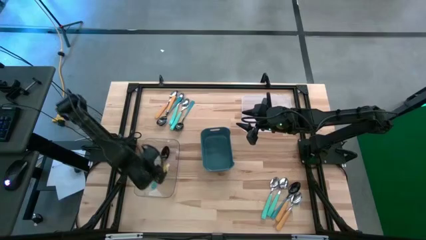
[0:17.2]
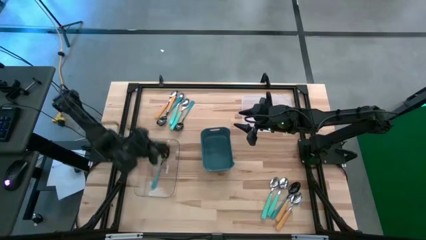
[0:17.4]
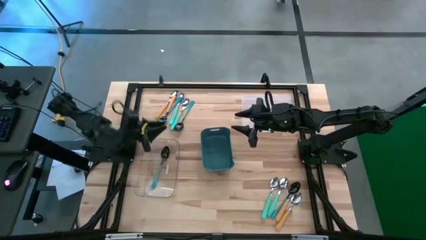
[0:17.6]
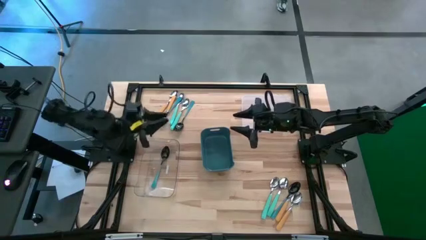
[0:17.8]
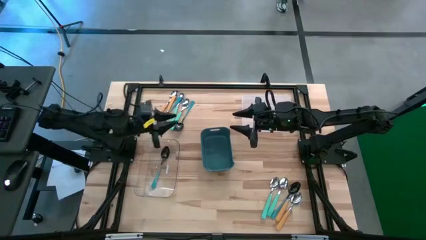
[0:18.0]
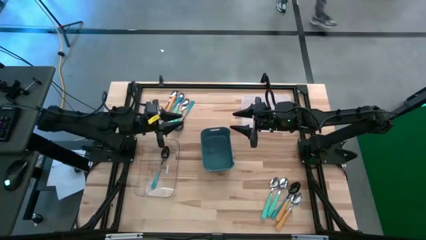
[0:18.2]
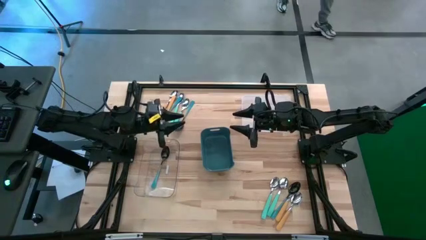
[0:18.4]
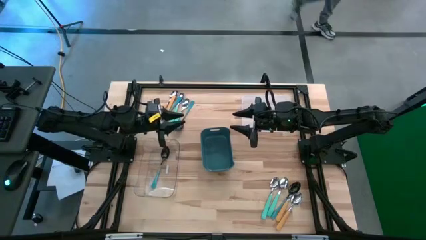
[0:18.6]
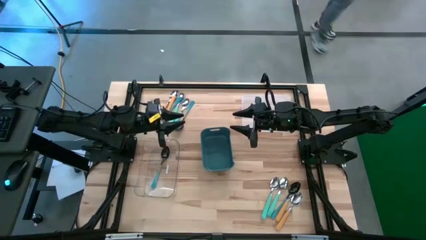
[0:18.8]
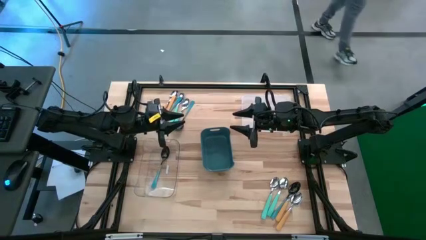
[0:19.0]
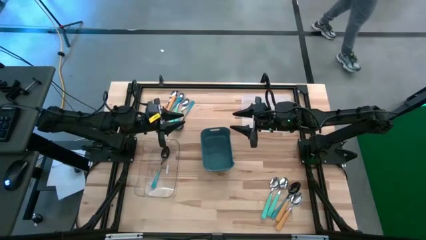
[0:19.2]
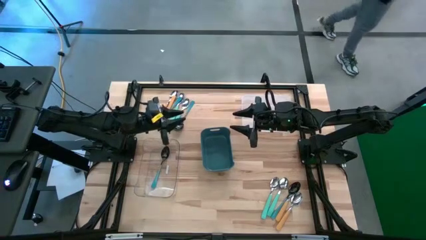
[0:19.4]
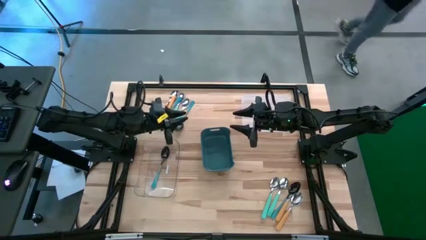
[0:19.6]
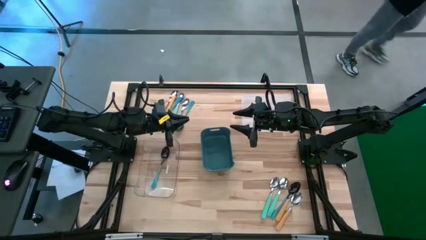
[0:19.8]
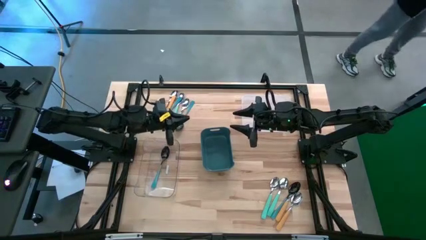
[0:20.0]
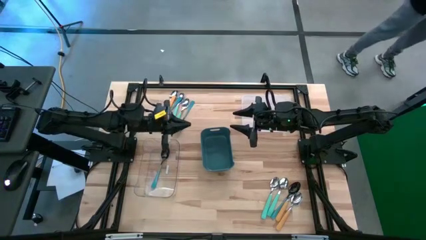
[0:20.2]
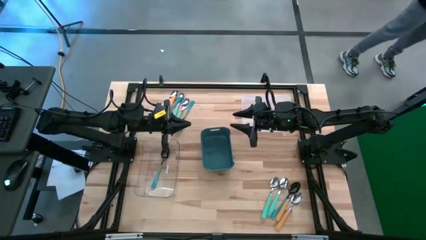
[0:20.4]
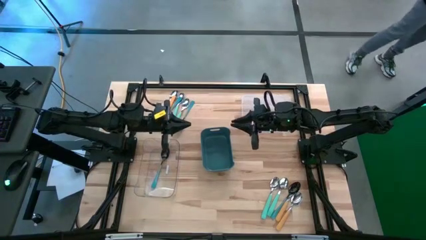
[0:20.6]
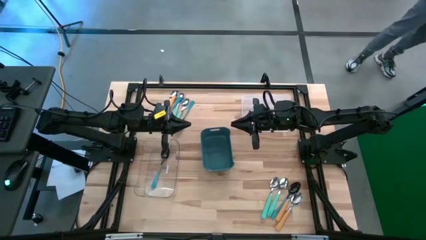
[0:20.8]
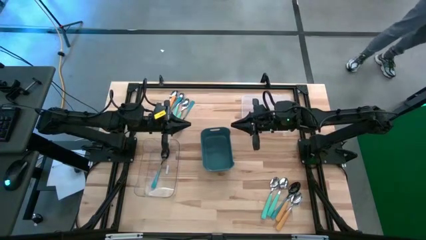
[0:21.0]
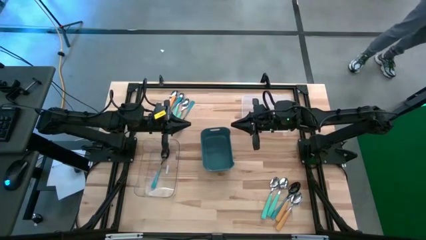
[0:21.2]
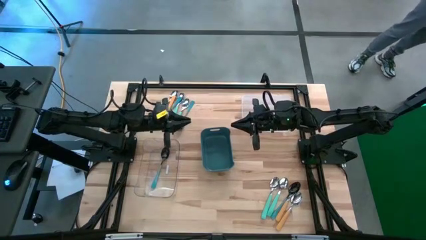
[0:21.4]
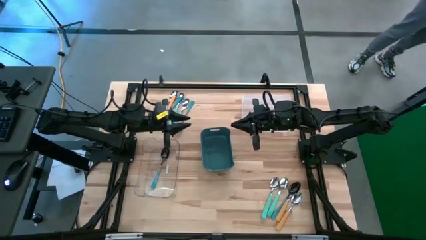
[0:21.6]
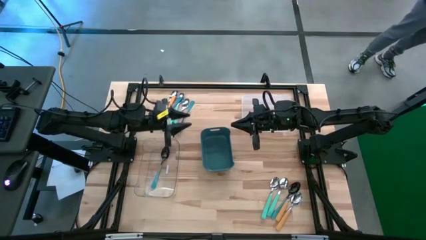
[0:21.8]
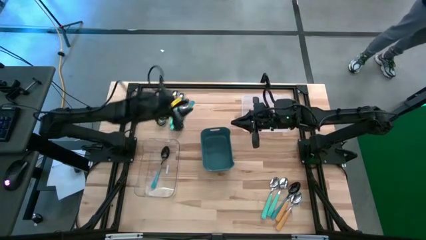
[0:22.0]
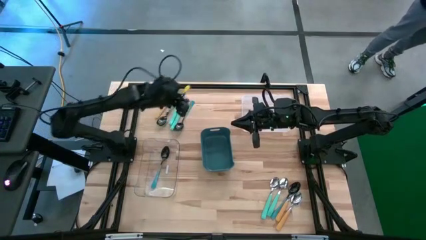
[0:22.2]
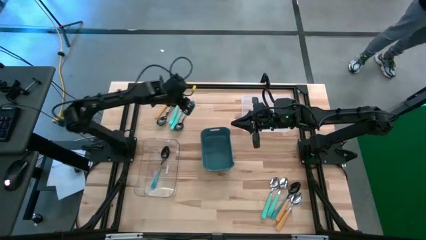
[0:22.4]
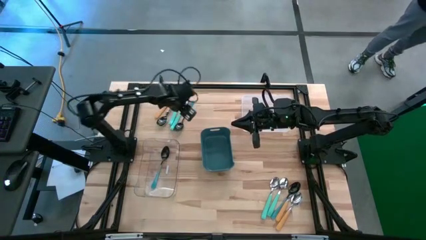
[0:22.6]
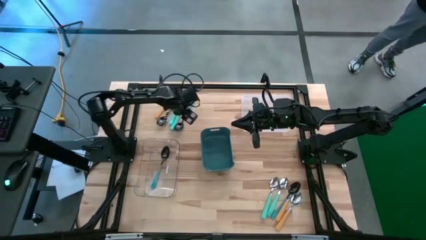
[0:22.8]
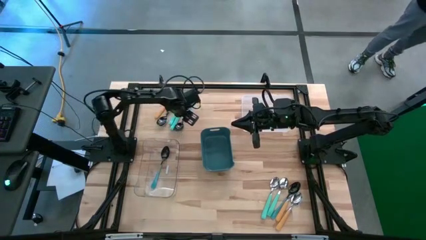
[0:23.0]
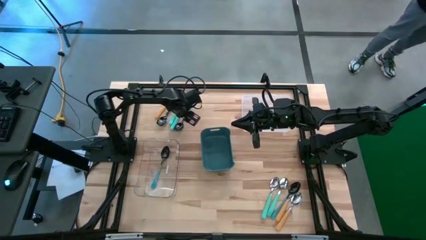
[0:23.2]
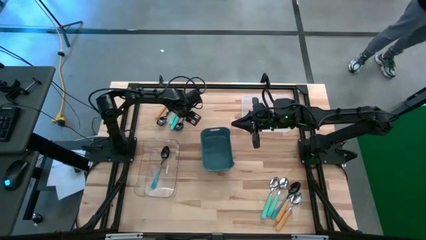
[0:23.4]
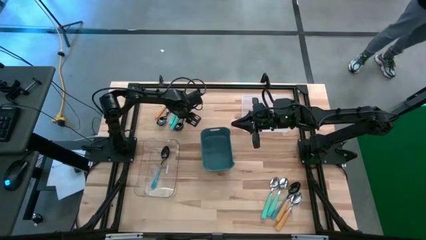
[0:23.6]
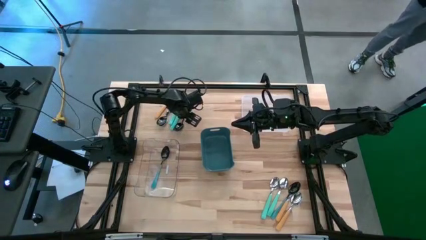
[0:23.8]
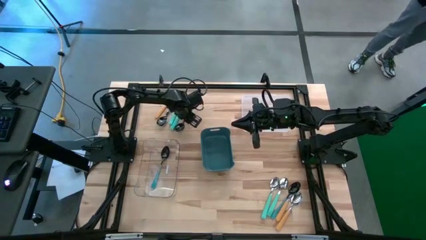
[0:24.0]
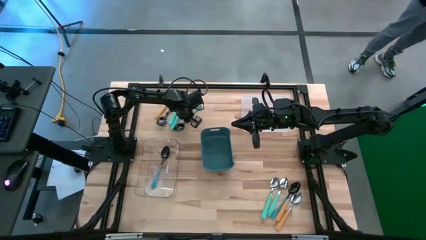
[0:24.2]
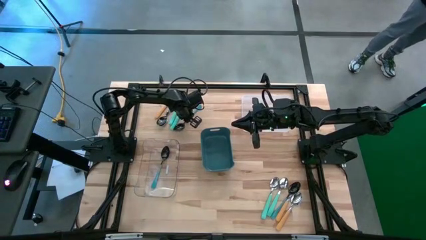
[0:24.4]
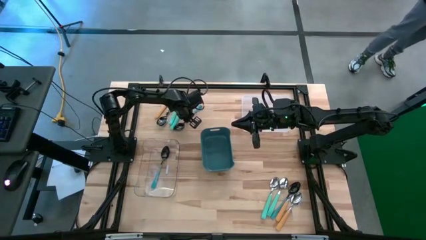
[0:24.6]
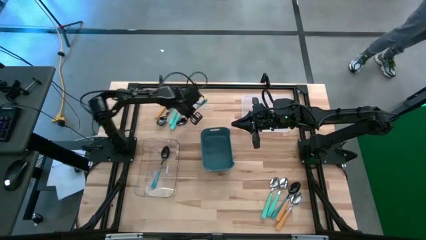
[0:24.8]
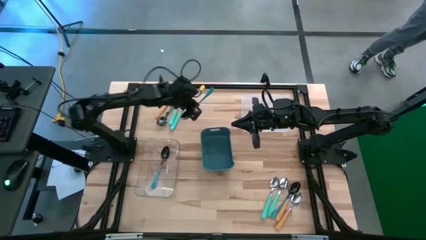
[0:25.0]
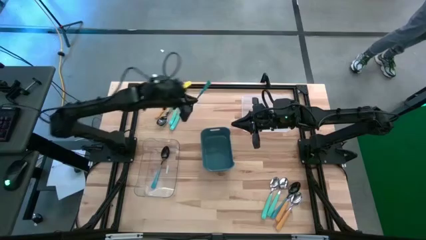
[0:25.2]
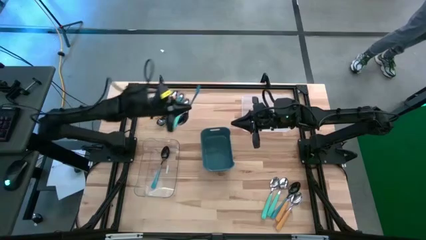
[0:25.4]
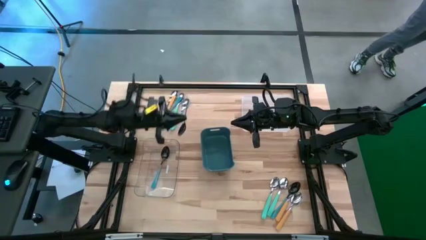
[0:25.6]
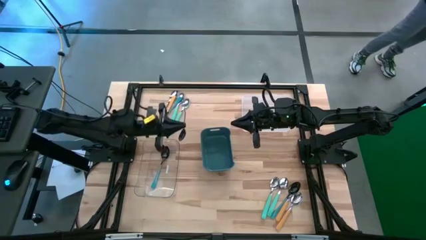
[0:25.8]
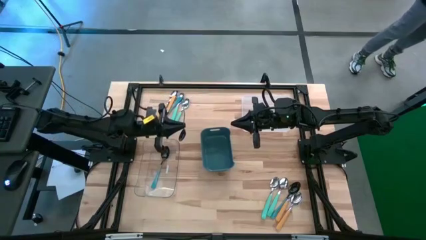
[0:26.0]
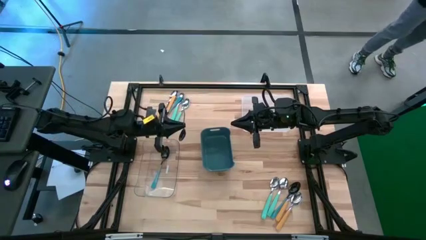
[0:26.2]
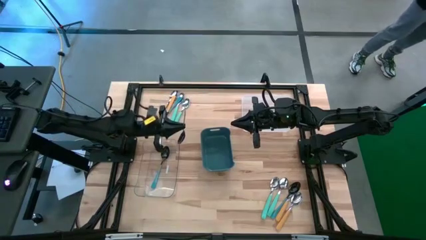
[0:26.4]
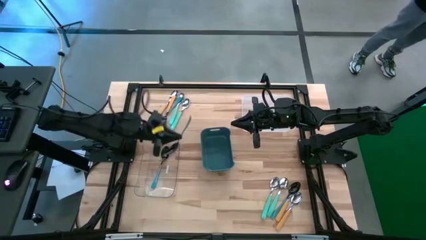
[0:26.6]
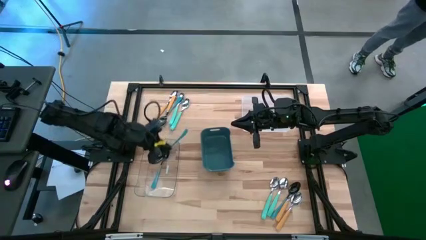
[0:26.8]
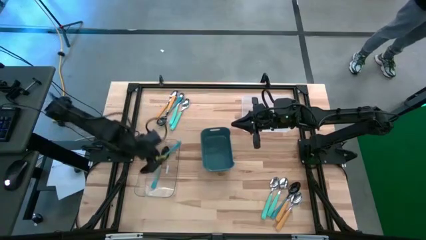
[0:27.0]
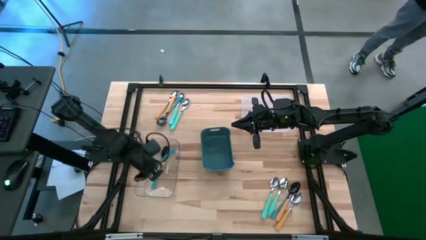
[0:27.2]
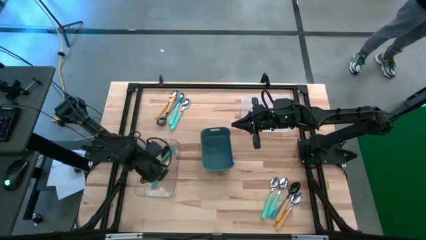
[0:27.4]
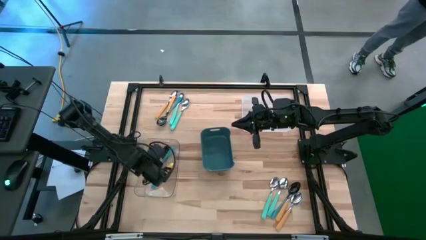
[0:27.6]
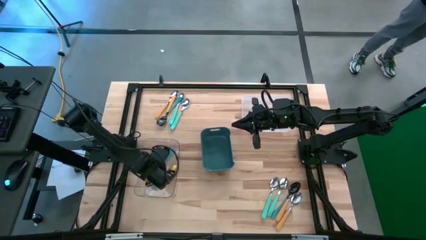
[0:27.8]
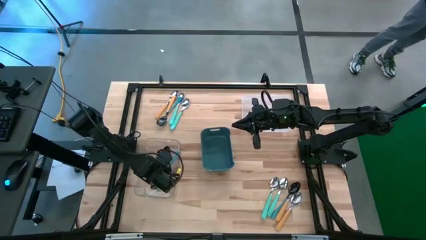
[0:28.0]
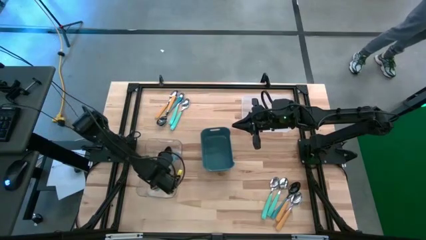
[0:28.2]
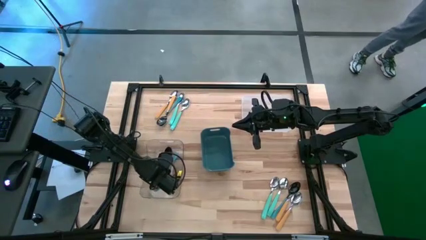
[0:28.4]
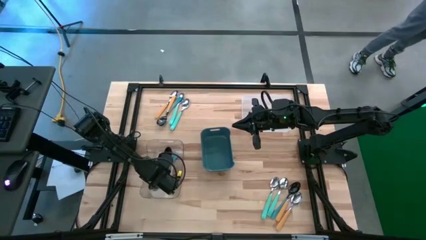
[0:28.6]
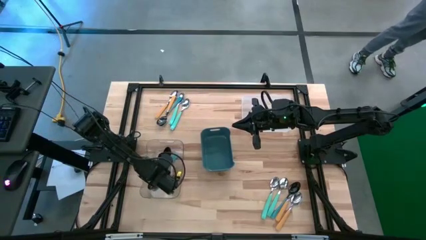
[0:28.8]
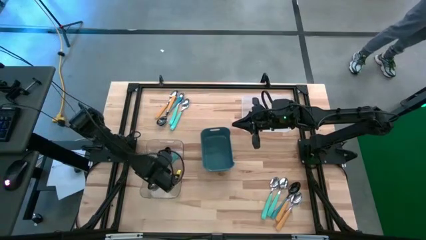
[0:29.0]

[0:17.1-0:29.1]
Task: Sort silverware by color (type)
Put the blue spoon into the transparent bin

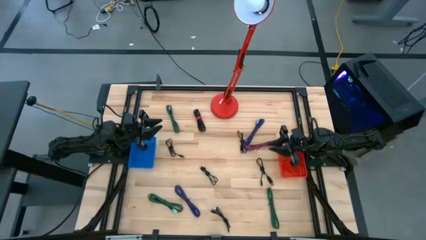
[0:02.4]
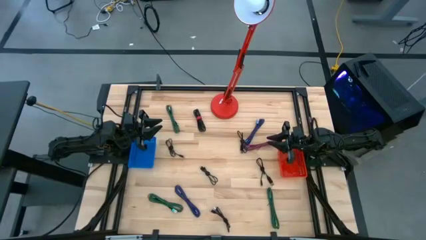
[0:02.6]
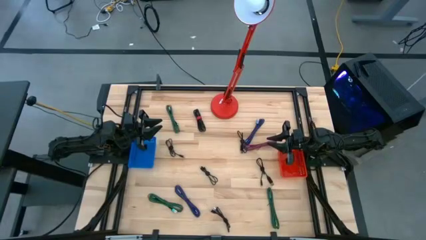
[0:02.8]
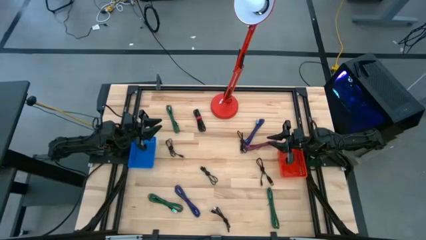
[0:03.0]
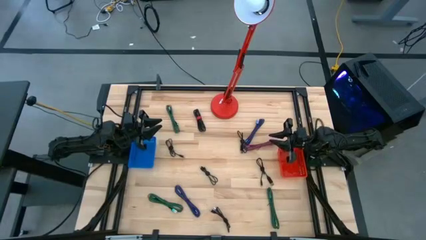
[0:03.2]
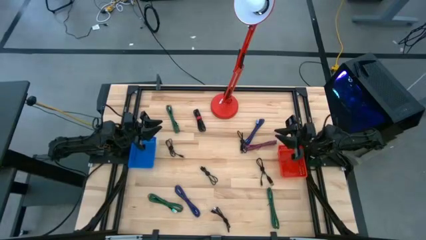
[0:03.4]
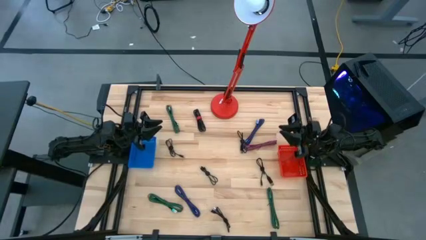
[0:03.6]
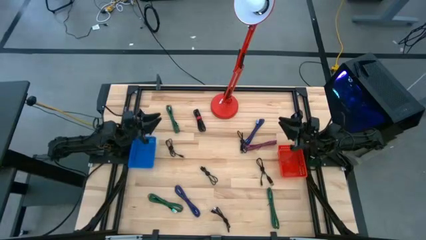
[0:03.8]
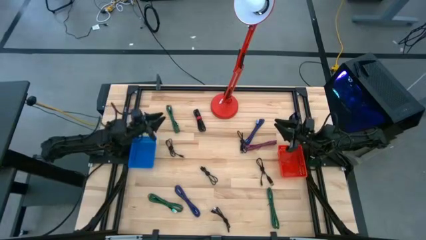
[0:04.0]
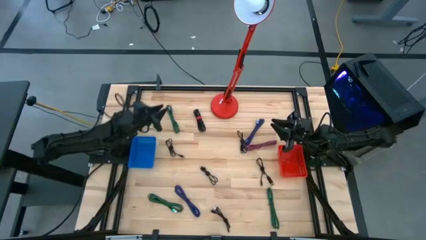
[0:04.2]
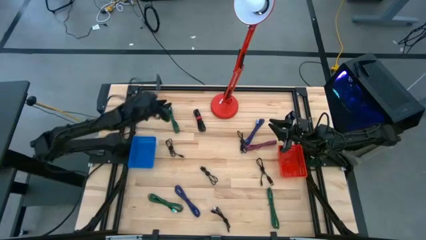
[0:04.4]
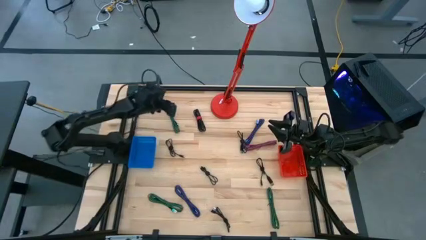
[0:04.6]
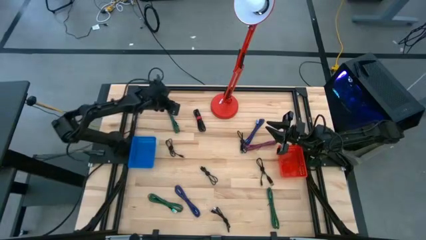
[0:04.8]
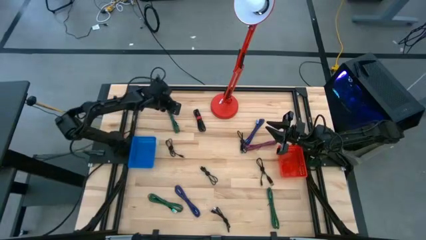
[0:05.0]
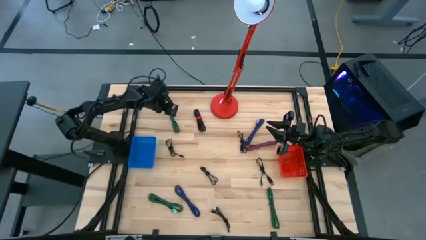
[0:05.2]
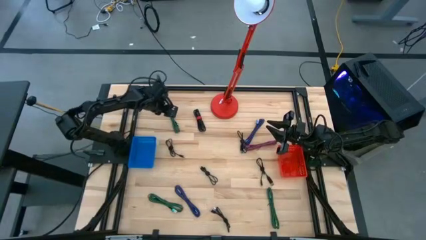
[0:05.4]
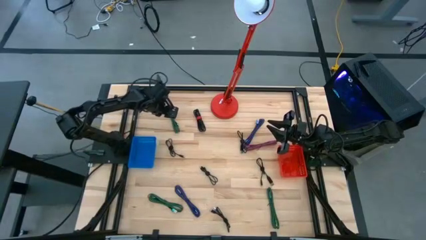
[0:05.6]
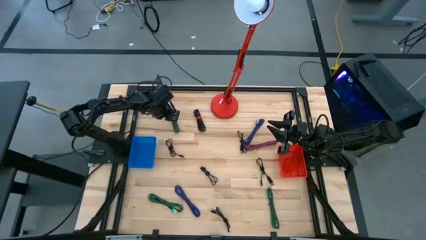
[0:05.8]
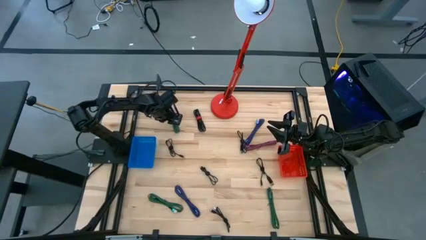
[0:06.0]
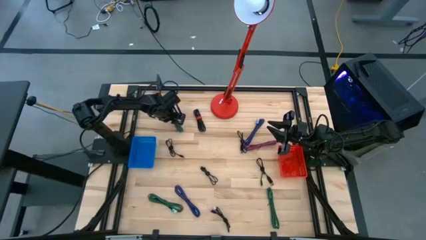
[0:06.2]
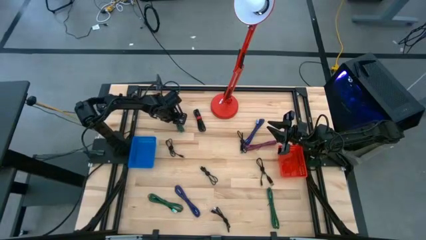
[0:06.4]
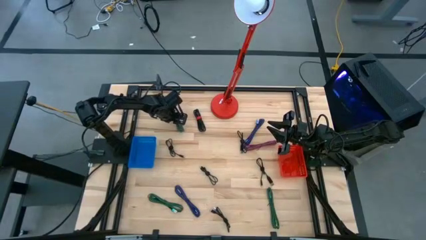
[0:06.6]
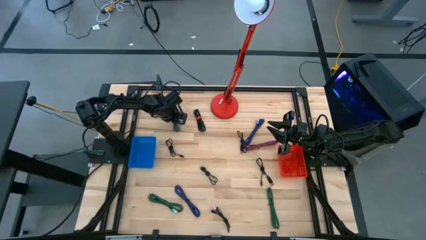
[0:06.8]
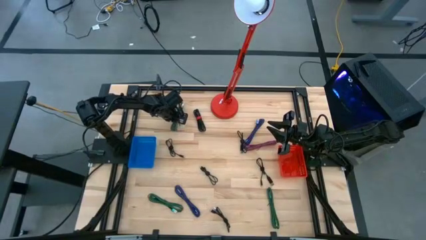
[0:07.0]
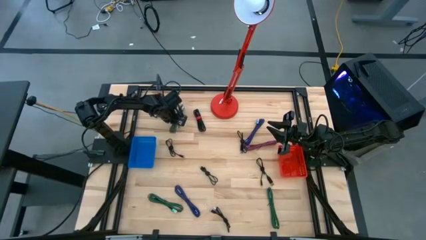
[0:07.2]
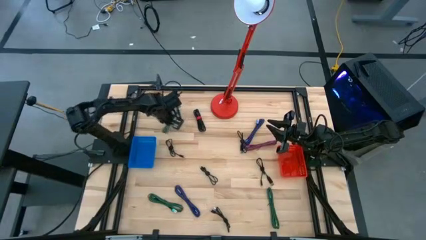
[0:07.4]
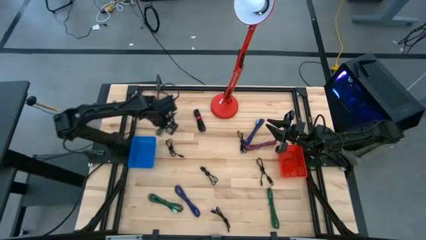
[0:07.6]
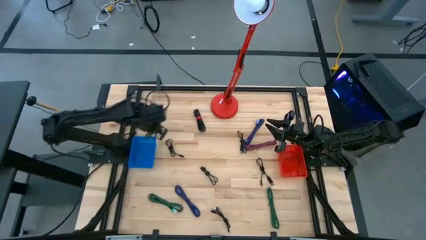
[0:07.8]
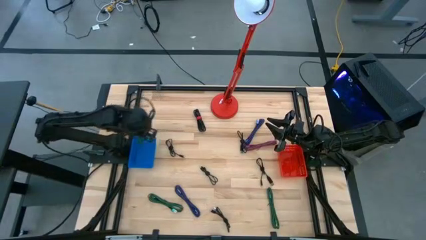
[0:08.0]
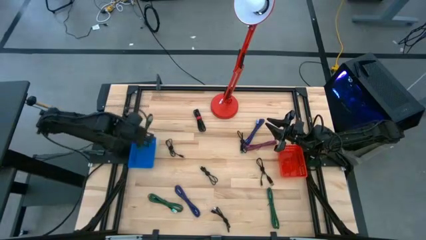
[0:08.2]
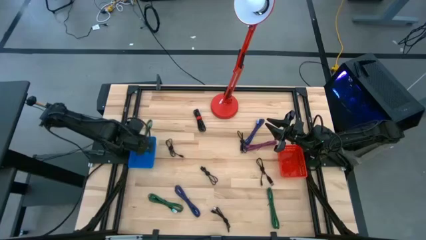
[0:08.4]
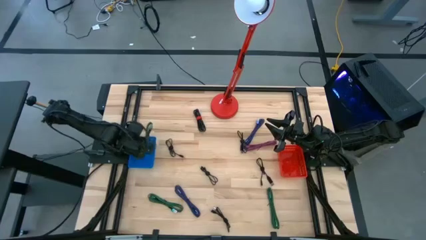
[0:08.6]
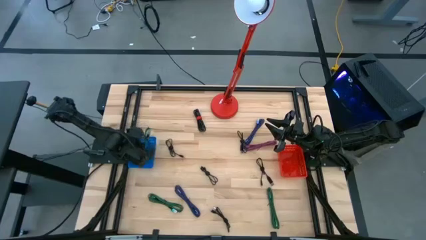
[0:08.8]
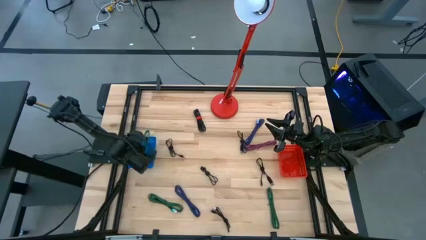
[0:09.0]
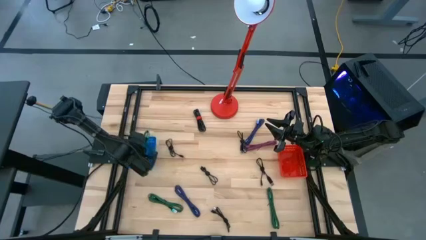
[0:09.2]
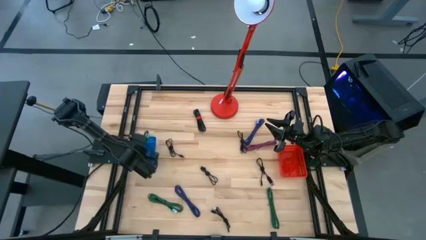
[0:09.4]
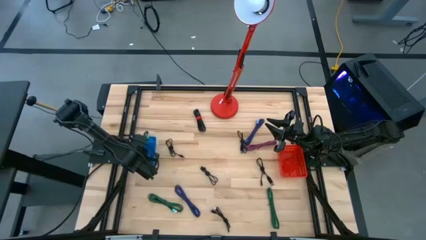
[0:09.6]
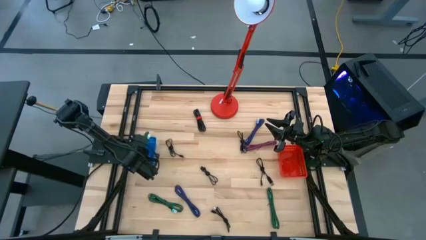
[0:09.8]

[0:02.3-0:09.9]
Task: Pick & Place USB Port
Put the green and black charger cable into the blue bin
